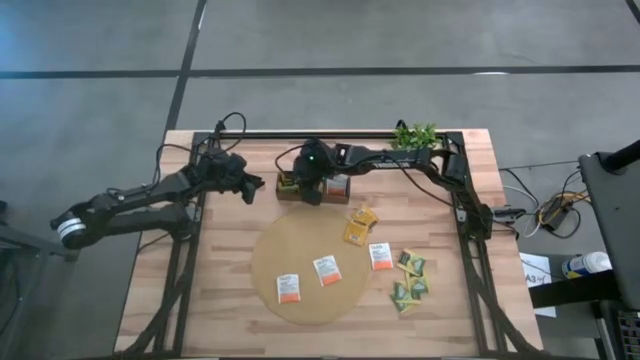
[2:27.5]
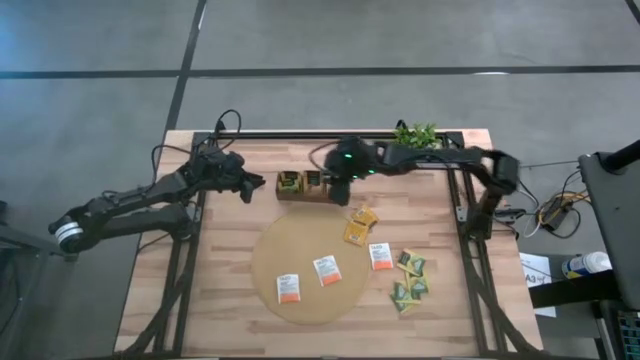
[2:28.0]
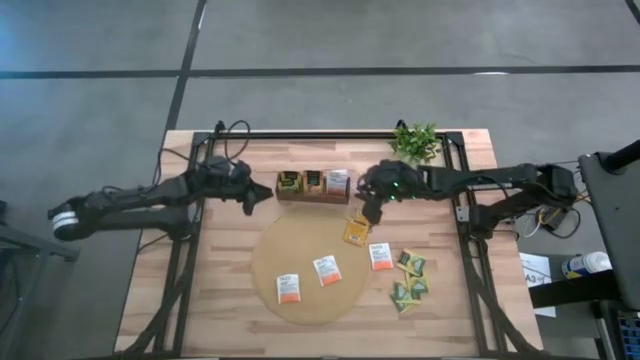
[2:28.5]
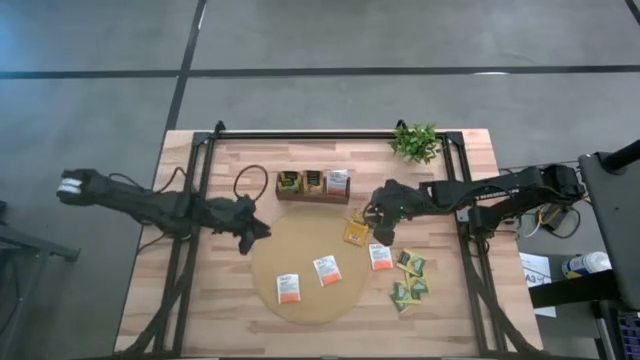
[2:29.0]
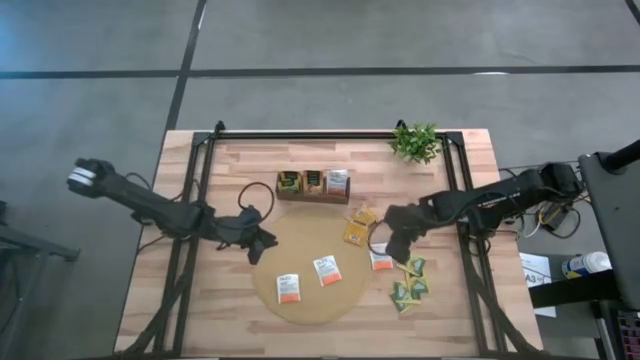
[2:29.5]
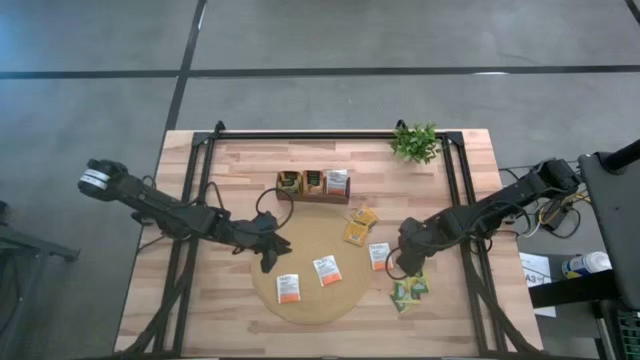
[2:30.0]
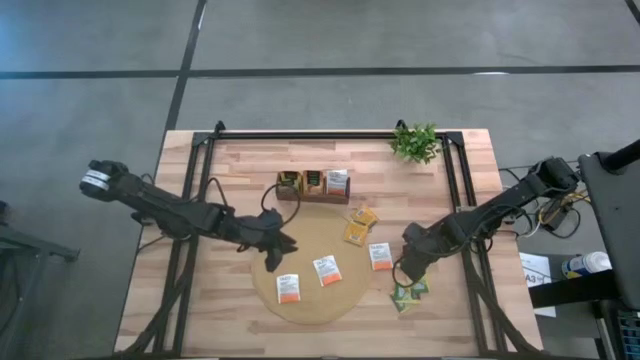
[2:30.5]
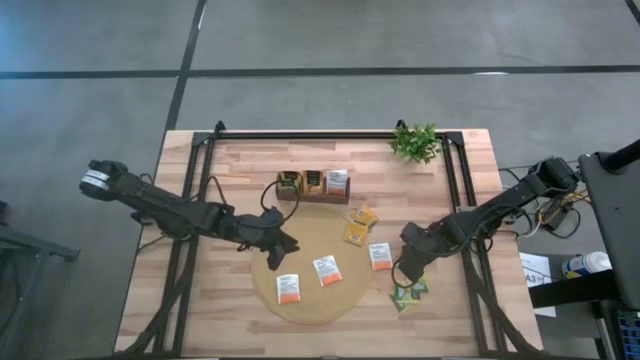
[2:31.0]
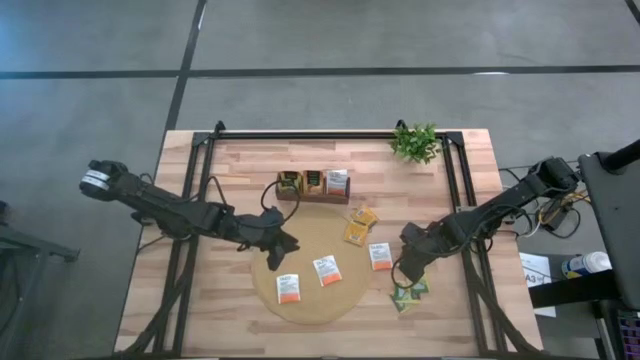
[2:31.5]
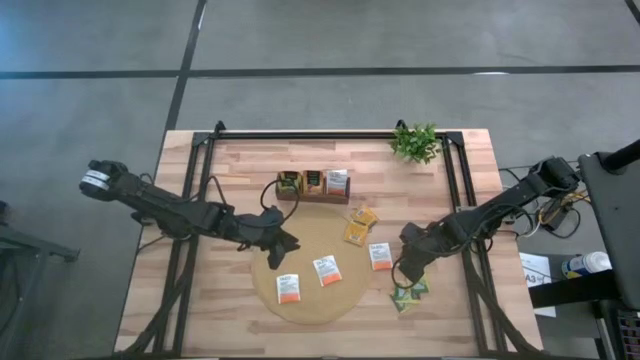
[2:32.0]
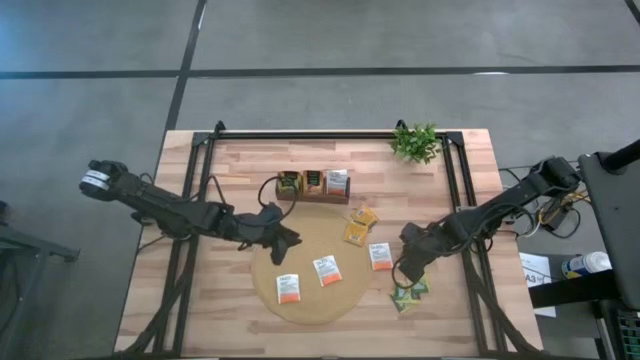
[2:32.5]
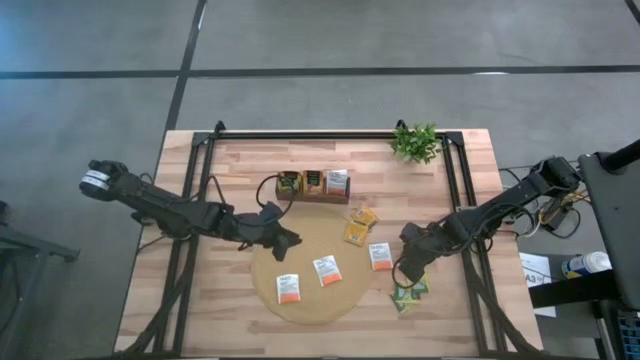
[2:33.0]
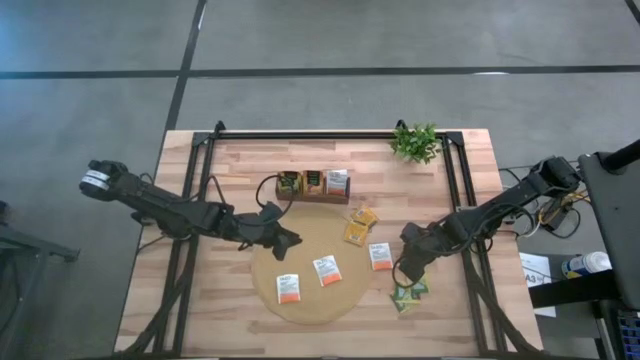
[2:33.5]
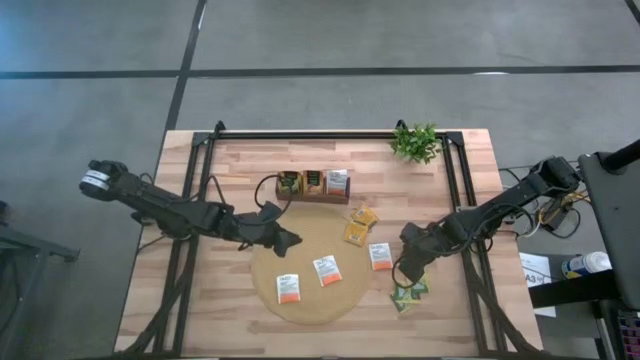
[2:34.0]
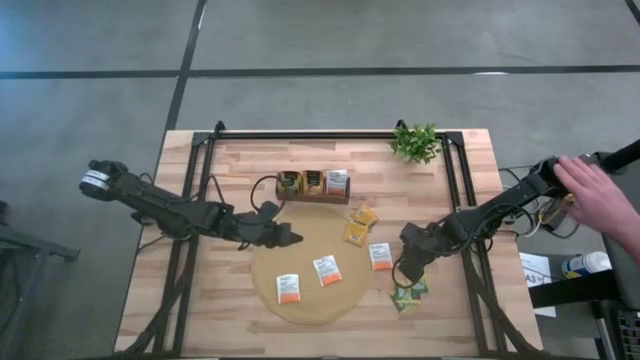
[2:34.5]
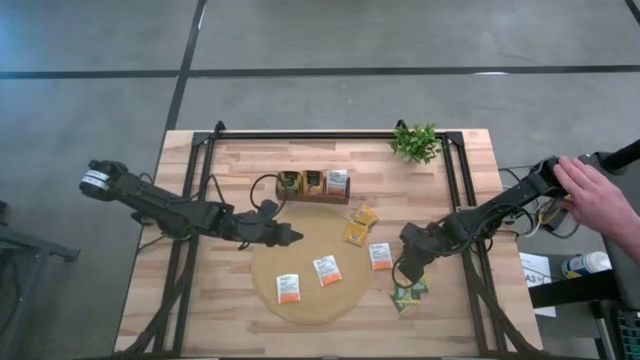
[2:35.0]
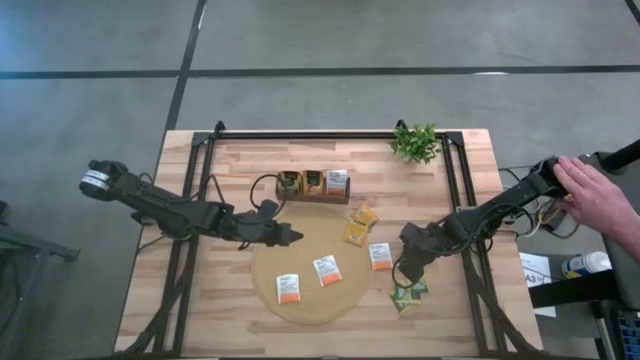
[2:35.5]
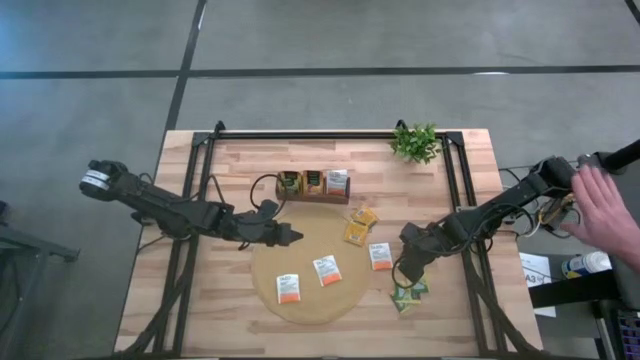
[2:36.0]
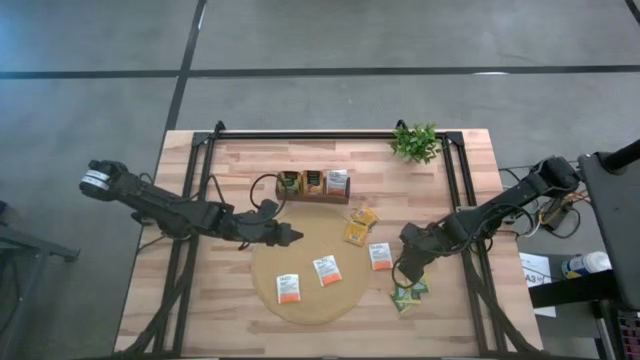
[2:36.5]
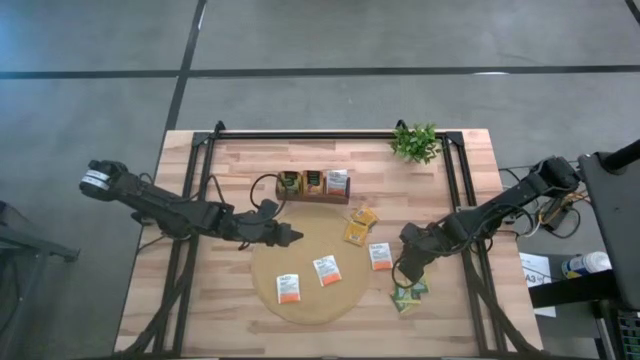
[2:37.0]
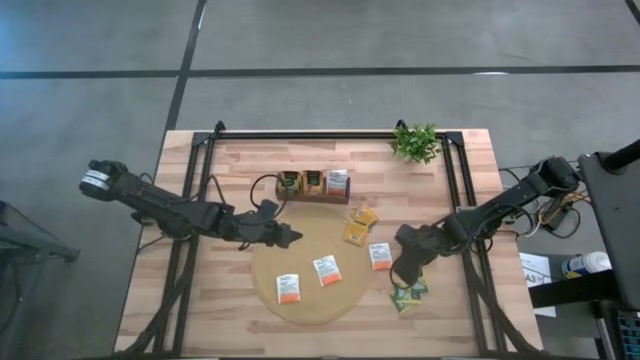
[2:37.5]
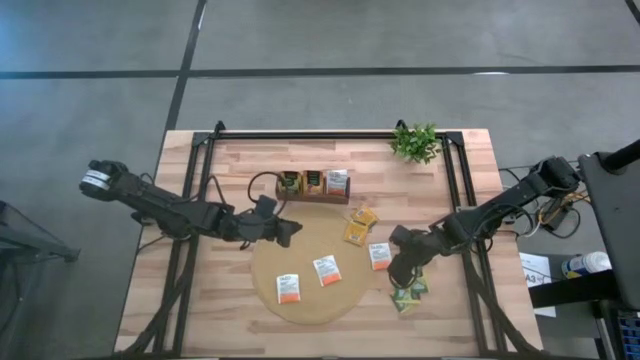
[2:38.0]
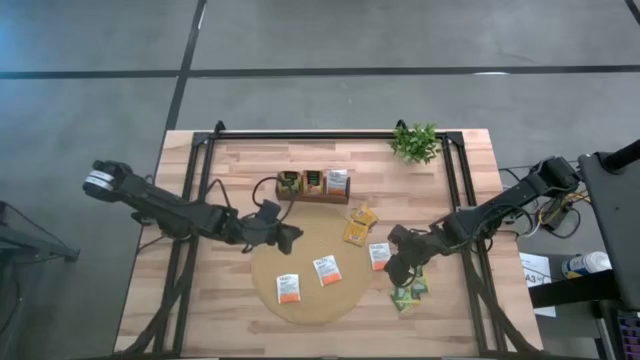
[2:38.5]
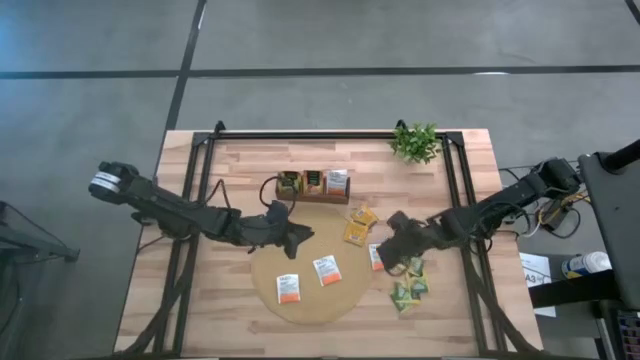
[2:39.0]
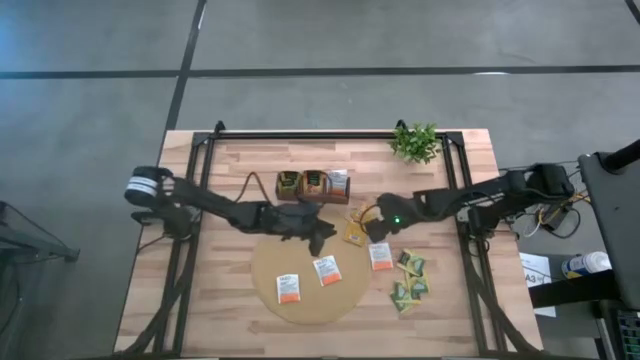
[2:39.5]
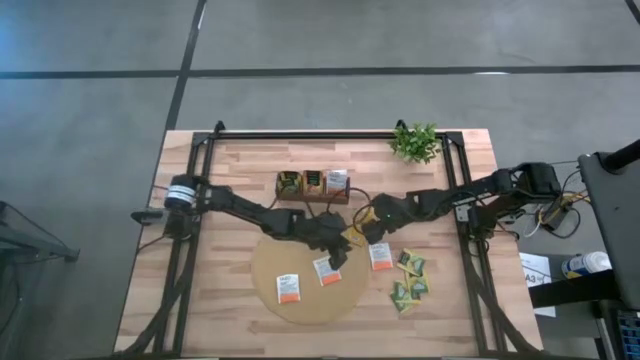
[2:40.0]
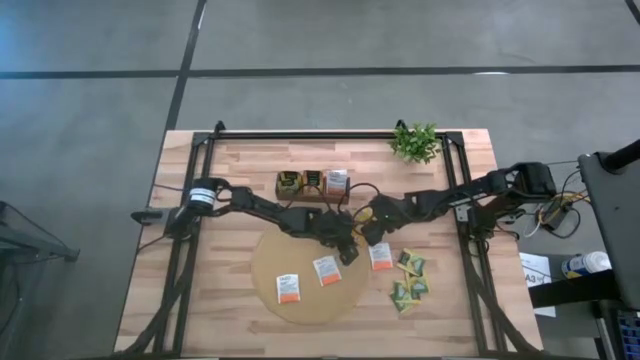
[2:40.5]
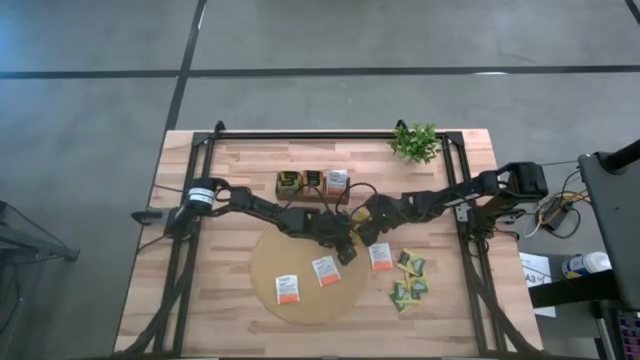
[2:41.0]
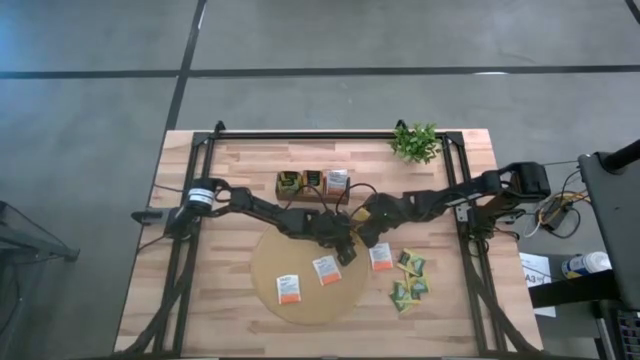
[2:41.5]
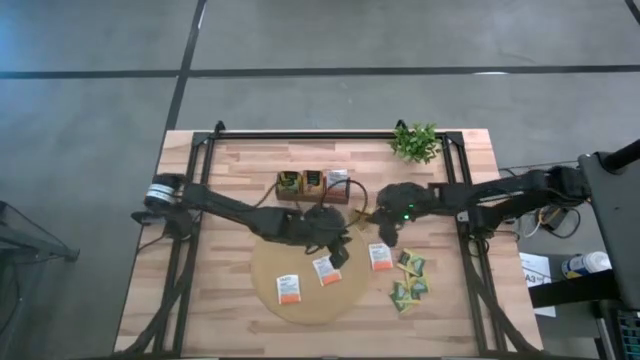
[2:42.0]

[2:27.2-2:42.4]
Task: Pick & Place Tea
Put the yellow tea bag into the middle section of the wooden organizer

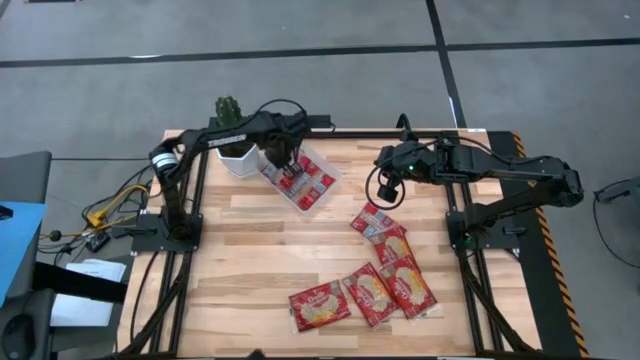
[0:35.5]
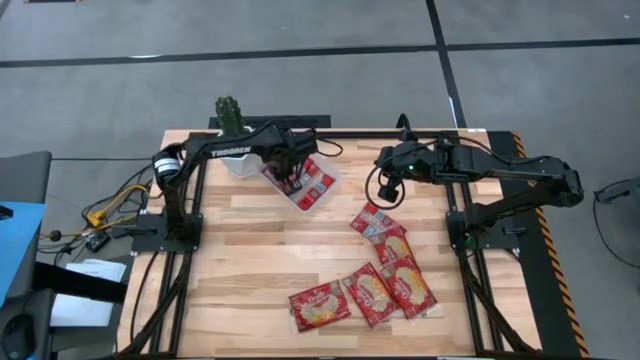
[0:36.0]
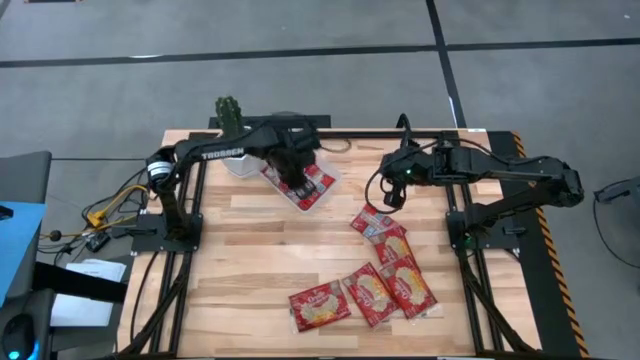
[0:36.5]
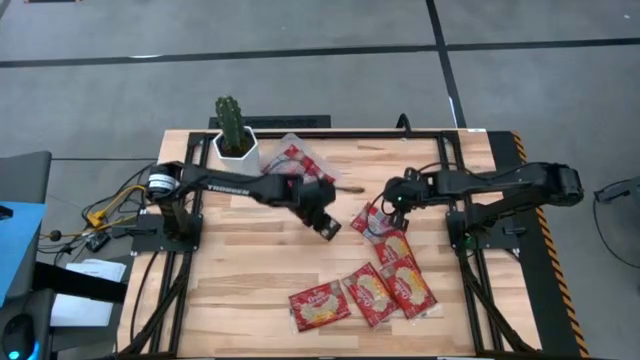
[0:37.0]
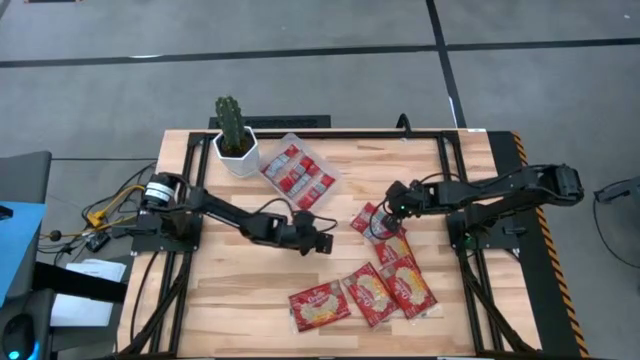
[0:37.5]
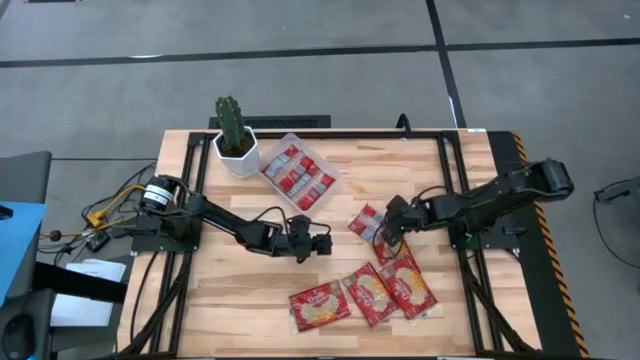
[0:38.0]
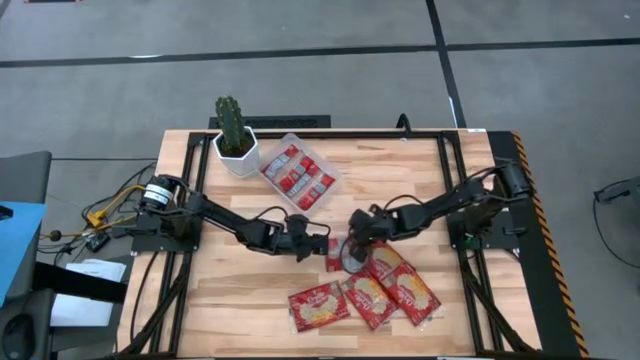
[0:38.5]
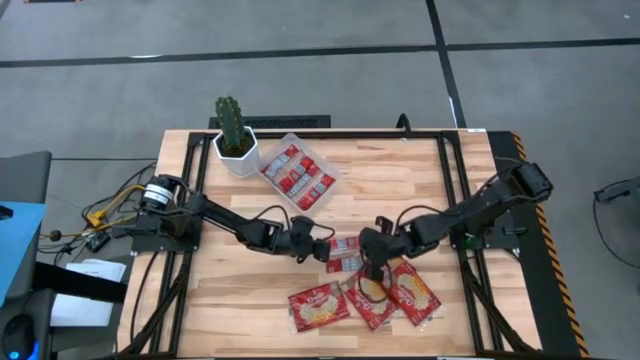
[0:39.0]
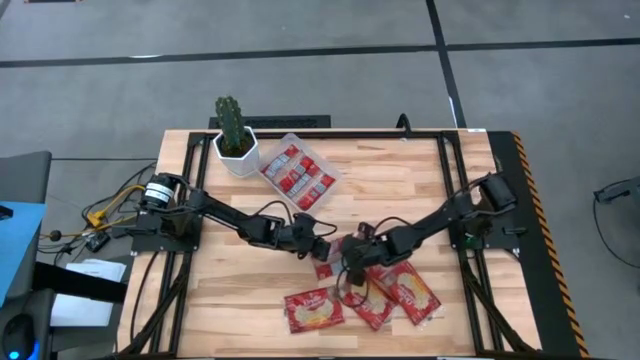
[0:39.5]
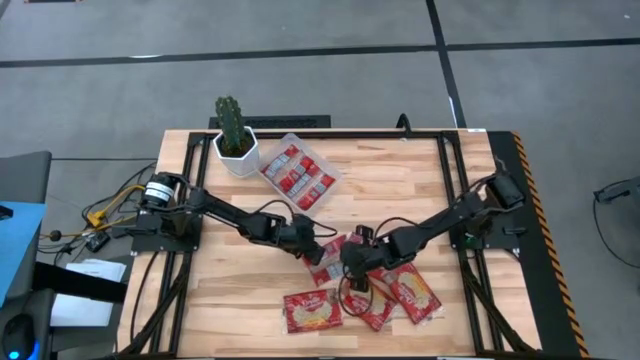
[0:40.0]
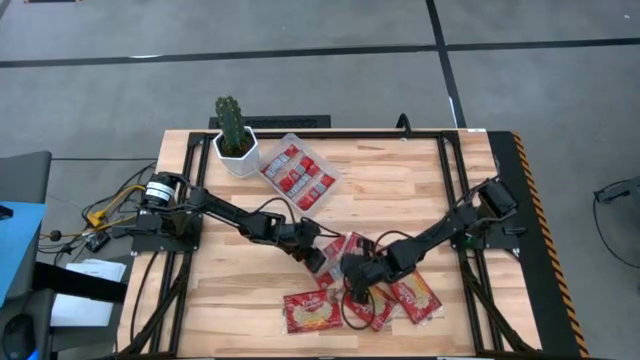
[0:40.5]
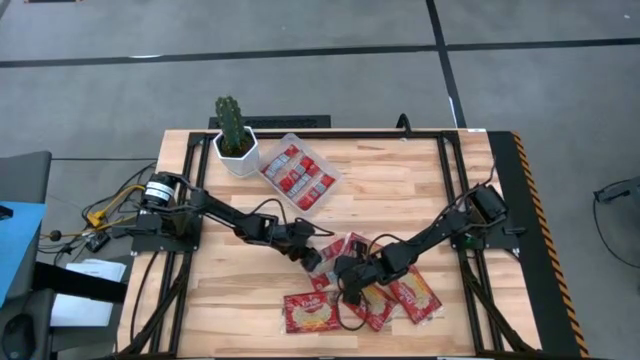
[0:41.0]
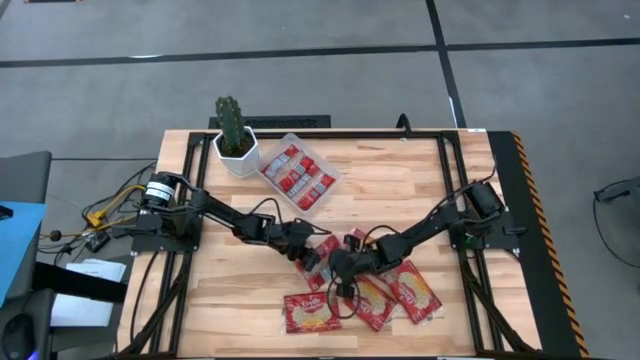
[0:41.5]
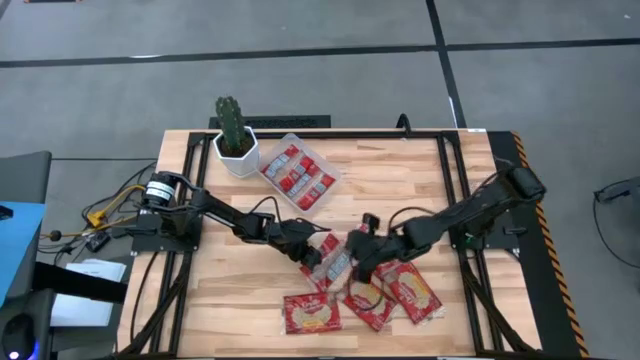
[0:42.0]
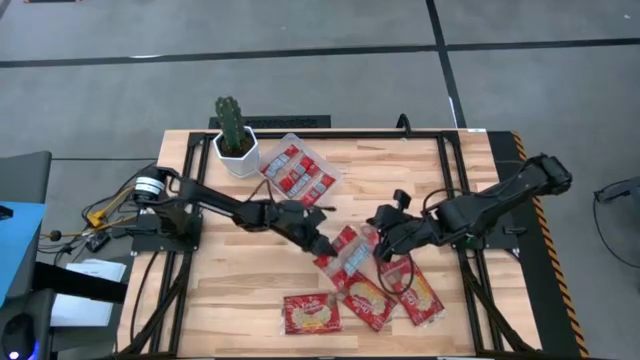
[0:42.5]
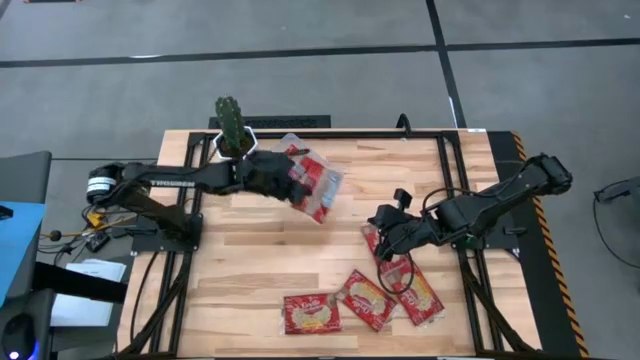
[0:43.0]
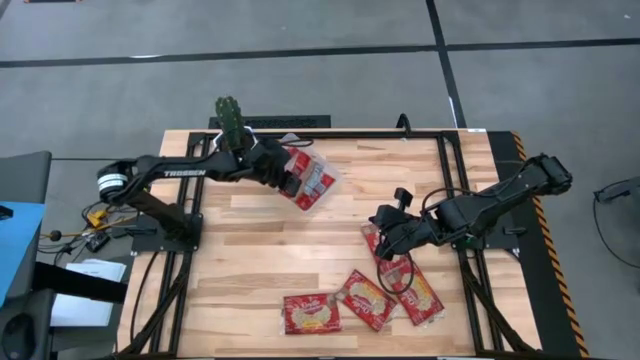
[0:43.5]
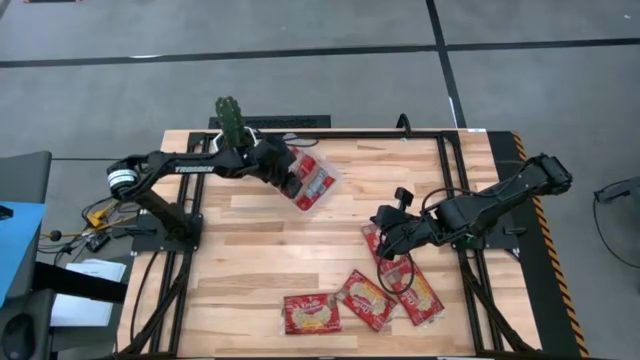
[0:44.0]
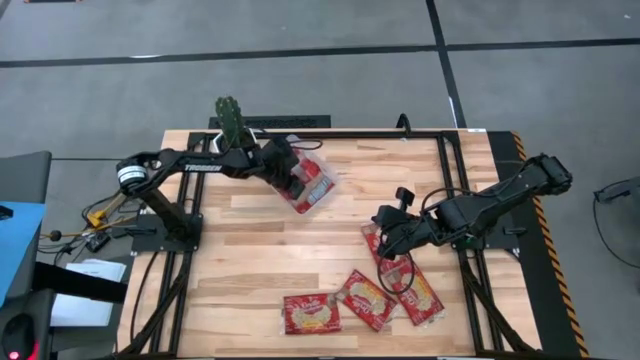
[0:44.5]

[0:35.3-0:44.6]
Task: Sort popcorn bags into baskets
Put the red popcorn bag into the transparent bin
